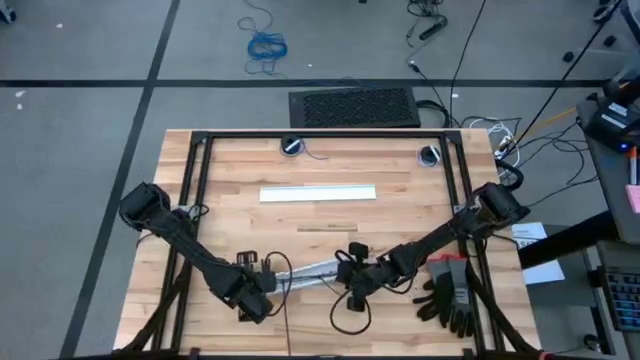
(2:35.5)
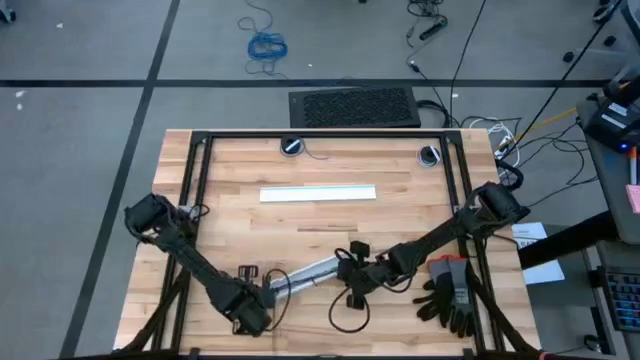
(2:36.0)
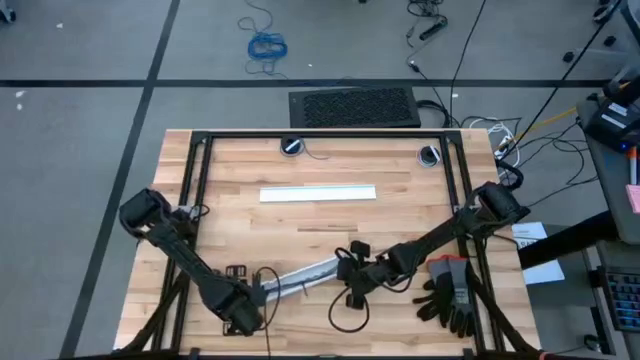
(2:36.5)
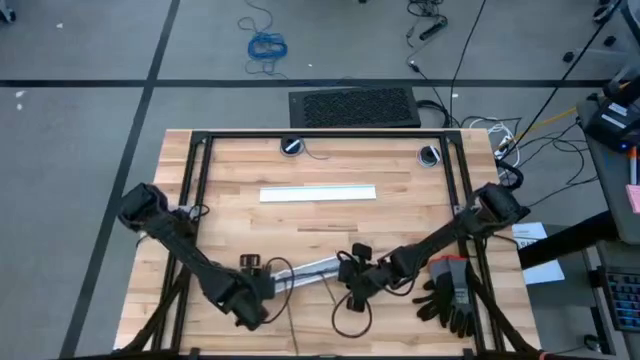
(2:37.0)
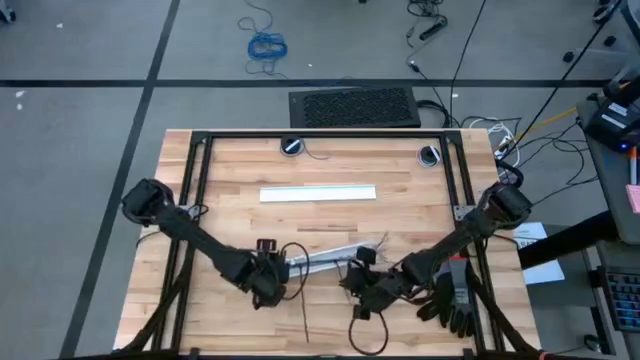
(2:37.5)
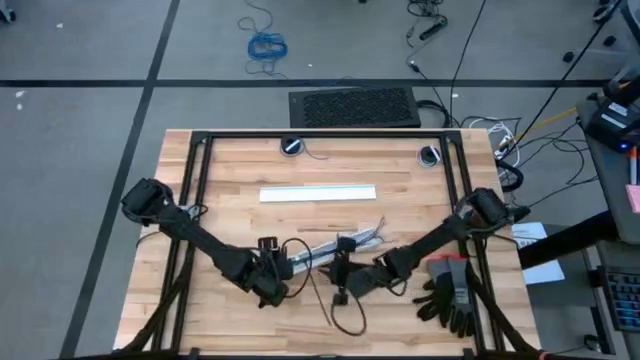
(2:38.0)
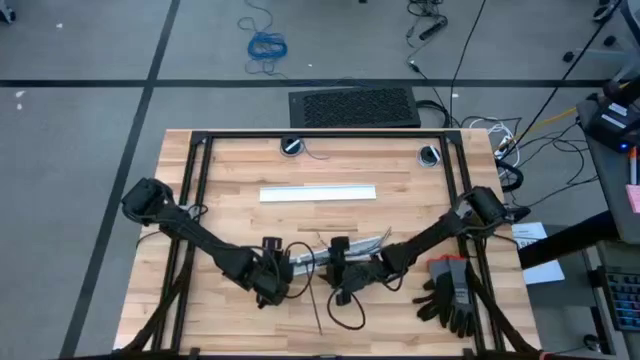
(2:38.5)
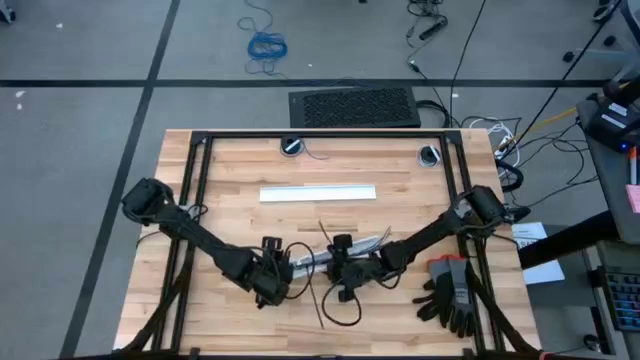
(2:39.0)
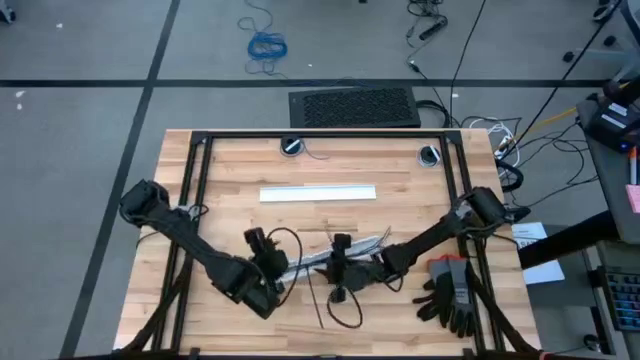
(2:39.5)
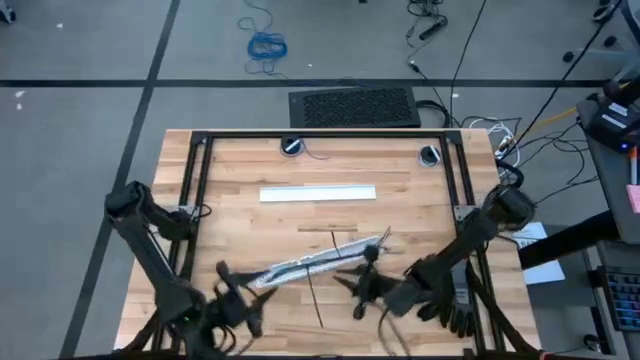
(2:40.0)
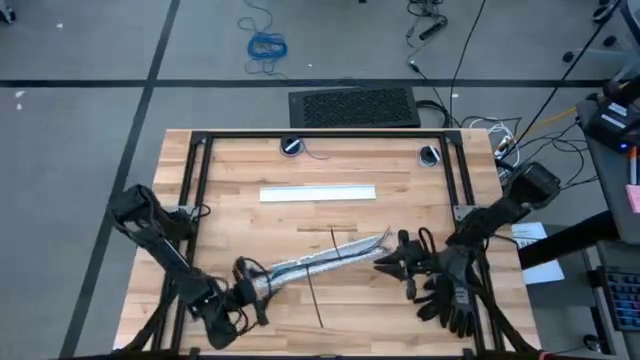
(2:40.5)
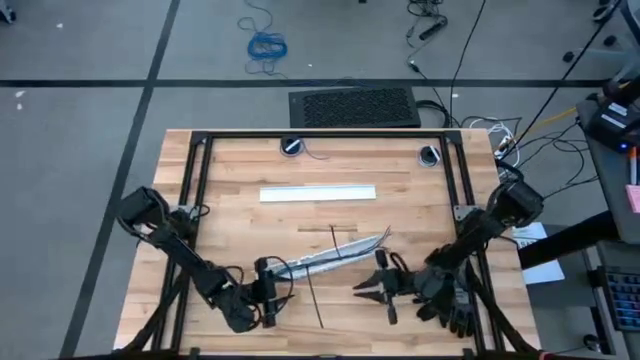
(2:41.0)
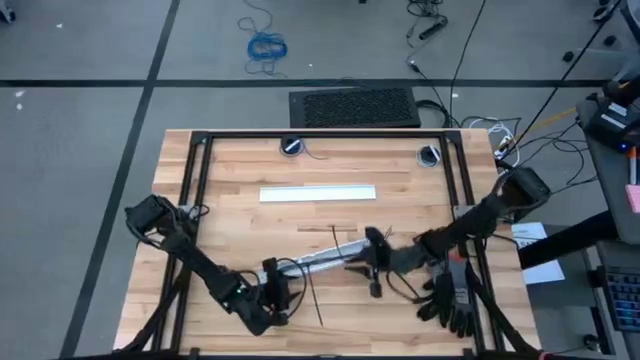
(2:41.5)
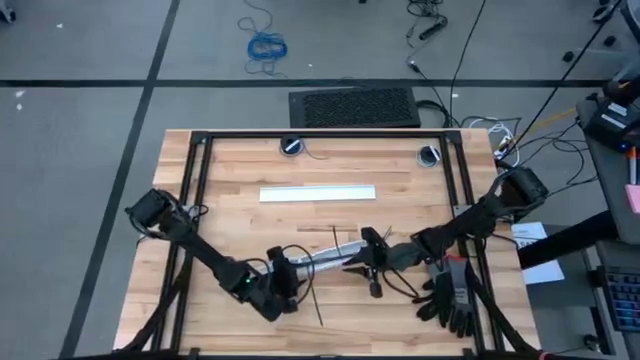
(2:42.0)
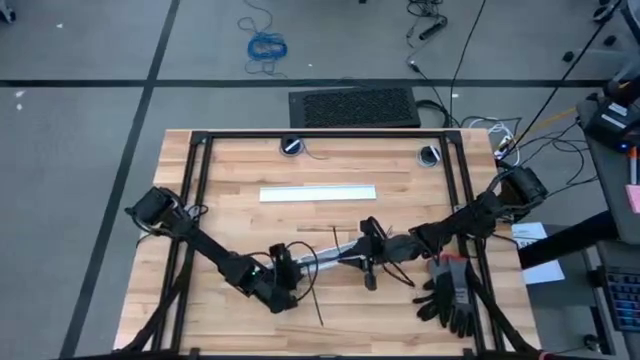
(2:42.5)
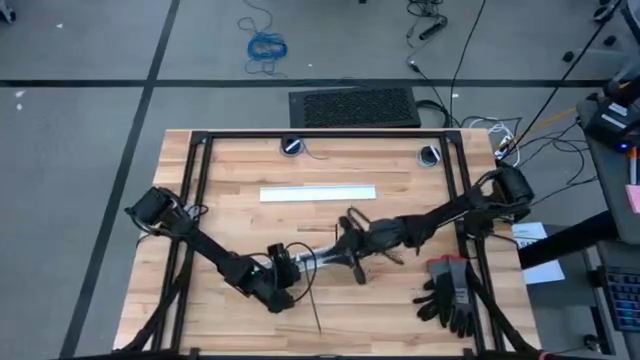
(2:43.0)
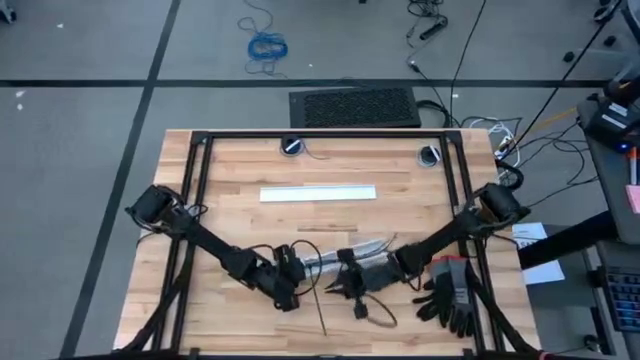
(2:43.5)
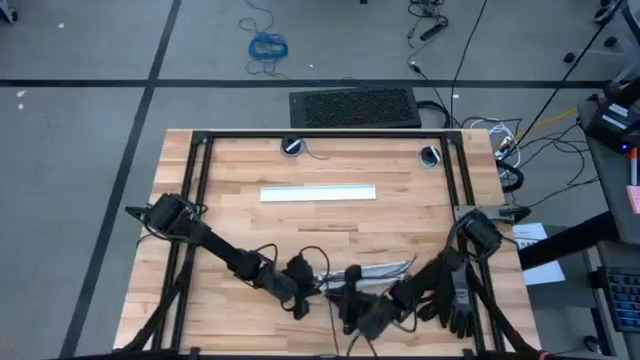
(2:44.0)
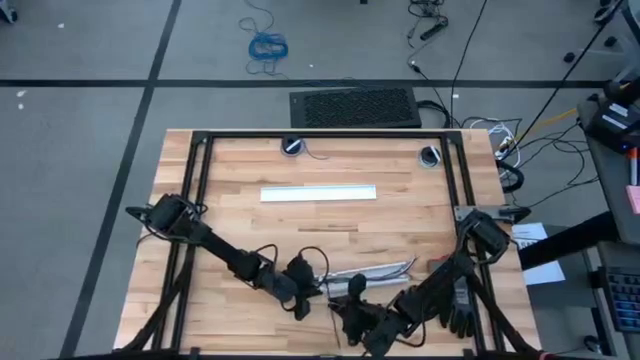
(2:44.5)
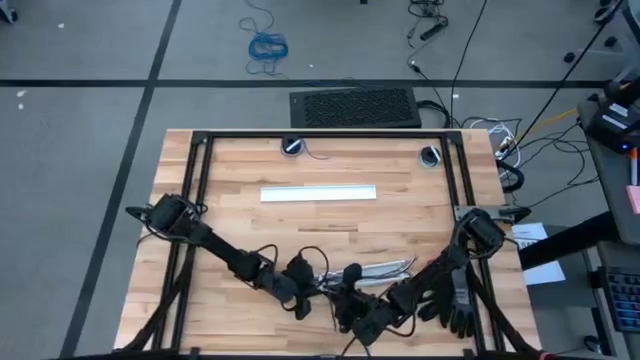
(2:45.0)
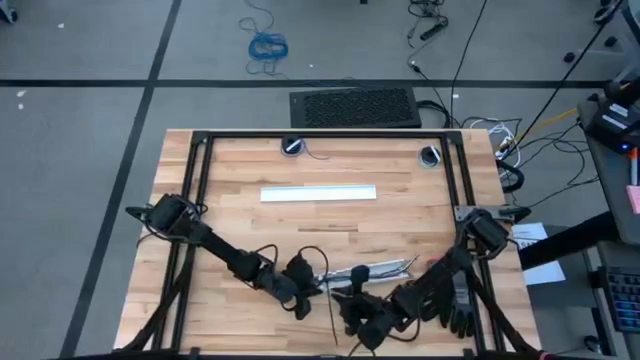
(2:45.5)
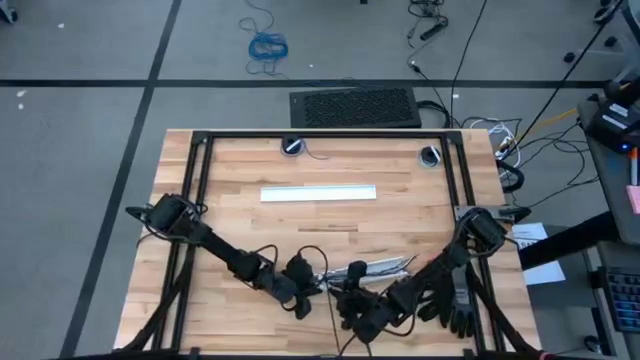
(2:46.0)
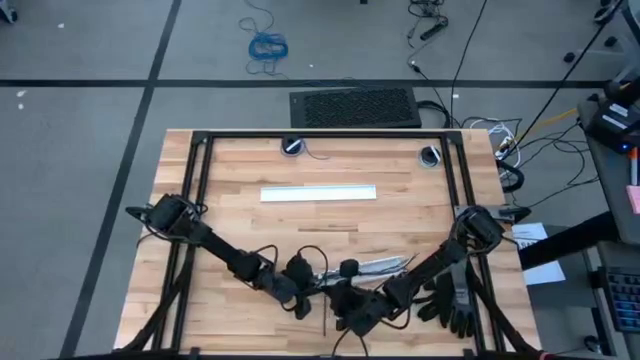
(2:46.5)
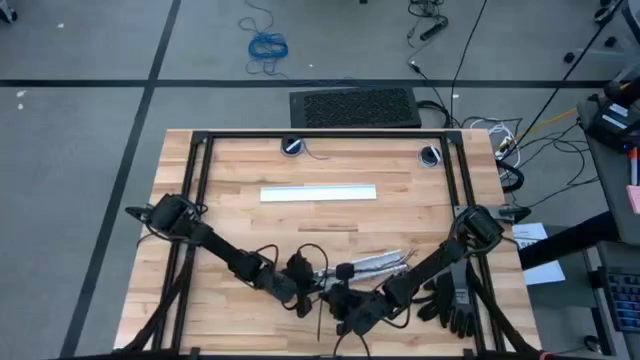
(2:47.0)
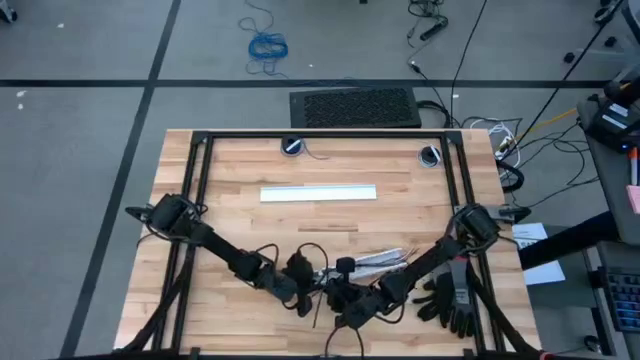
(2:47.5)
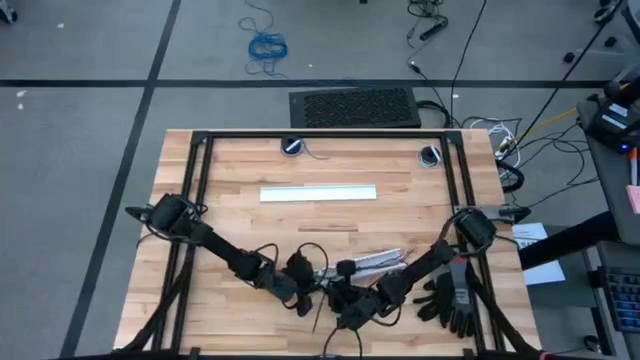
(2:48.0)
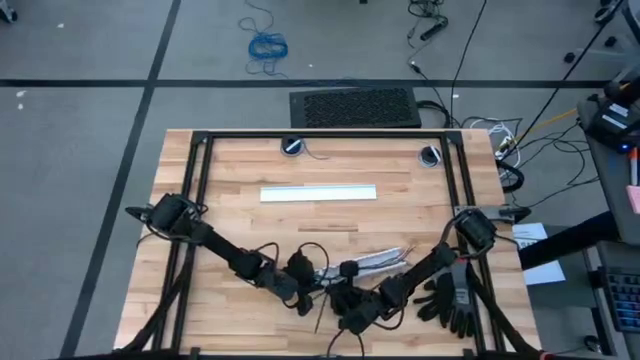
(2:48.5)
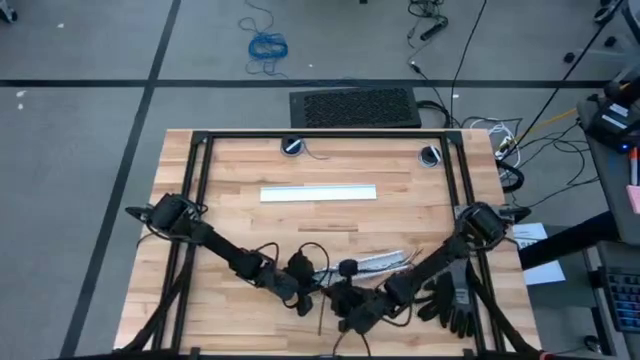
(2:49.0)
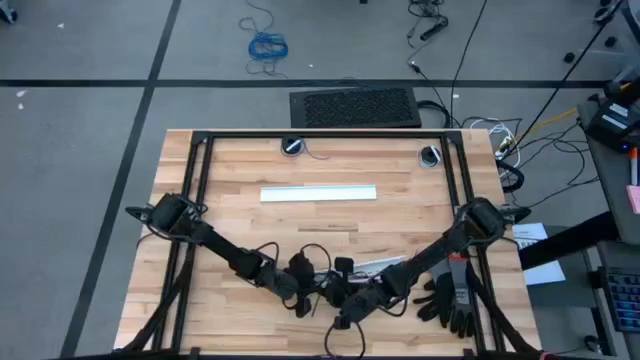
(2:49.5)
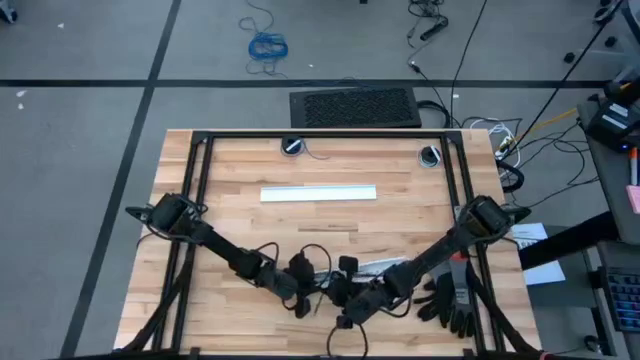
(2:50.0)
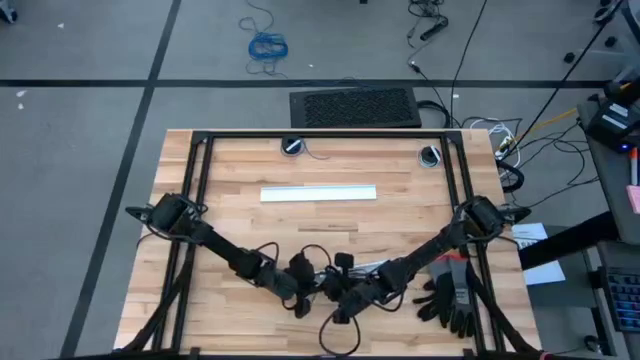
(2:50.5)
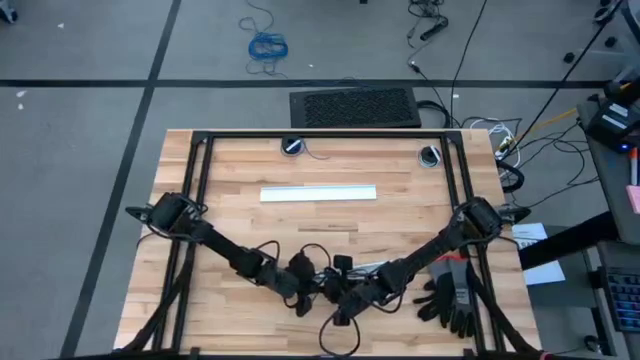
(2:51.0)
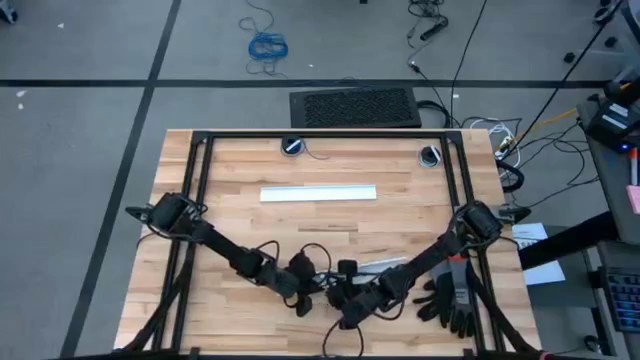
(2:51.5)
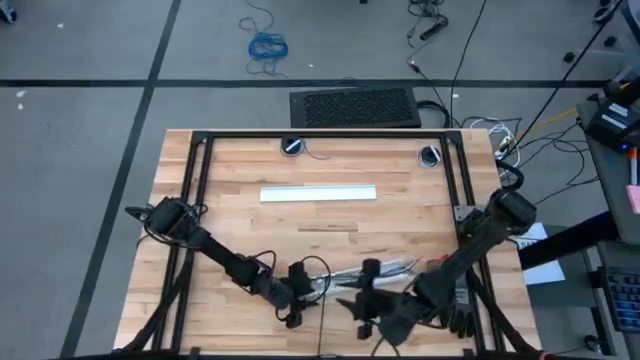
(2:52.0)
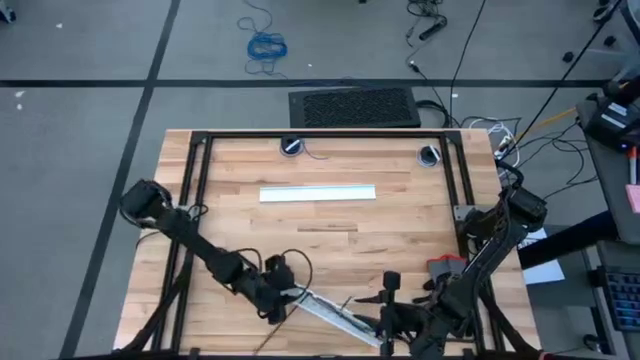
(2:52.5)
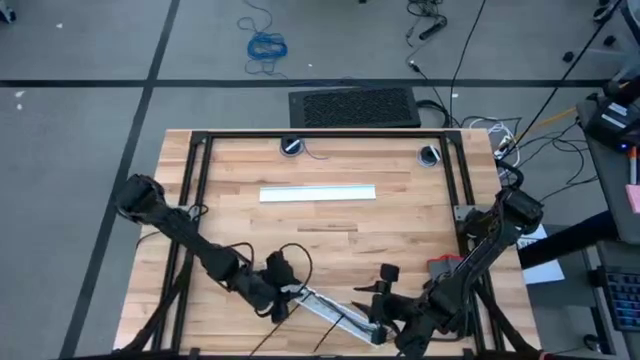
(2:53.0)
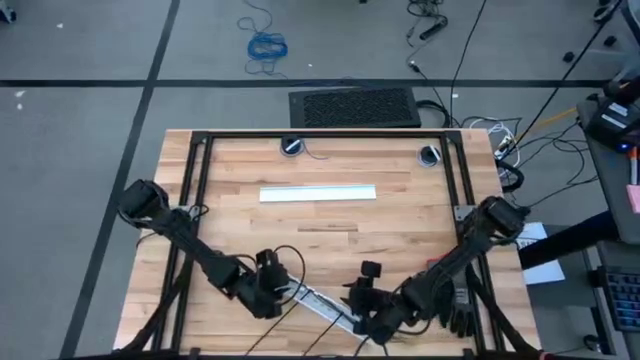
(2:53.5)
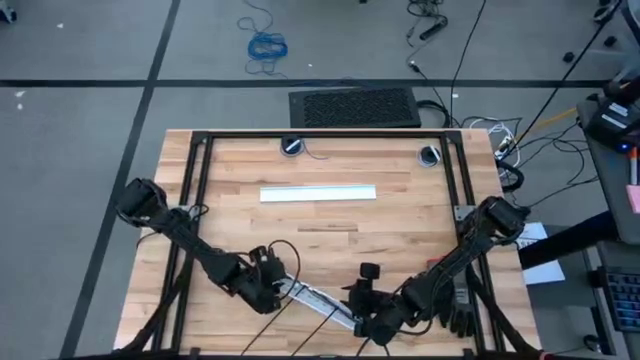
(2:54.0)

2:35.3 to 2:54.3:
Task: Ziptie cables
Put the ziptied cables into the cable duct

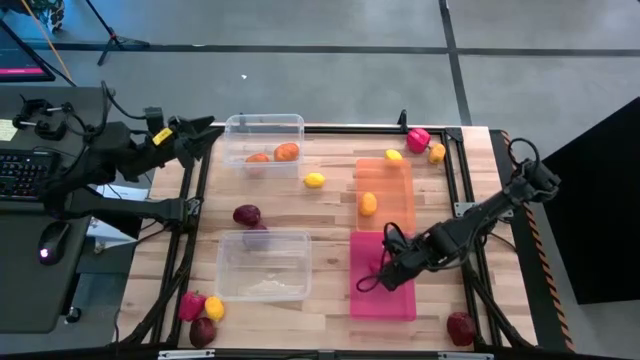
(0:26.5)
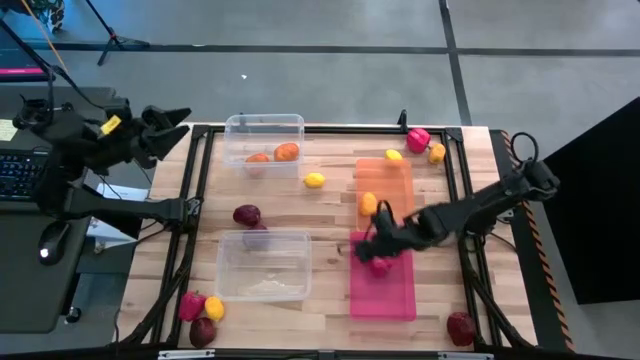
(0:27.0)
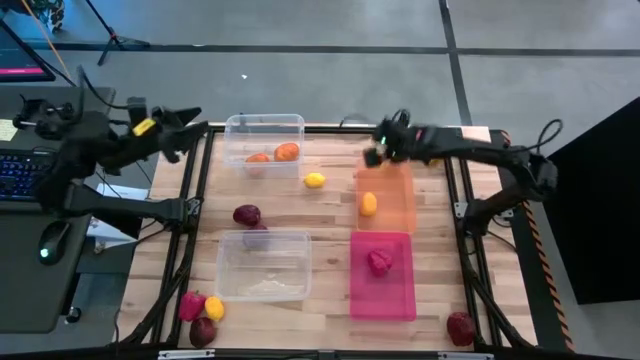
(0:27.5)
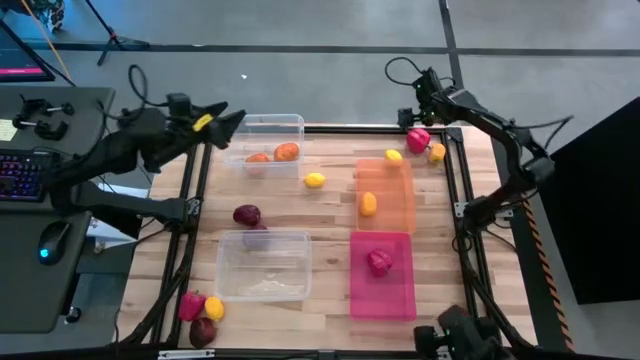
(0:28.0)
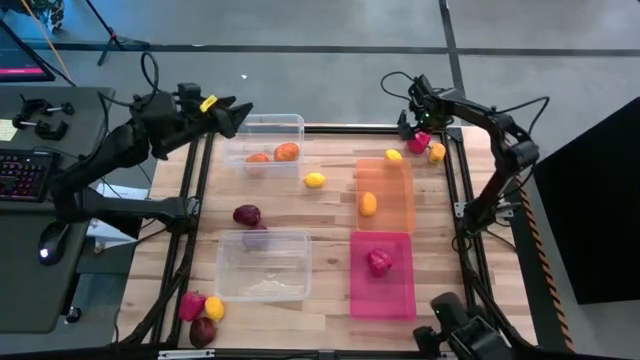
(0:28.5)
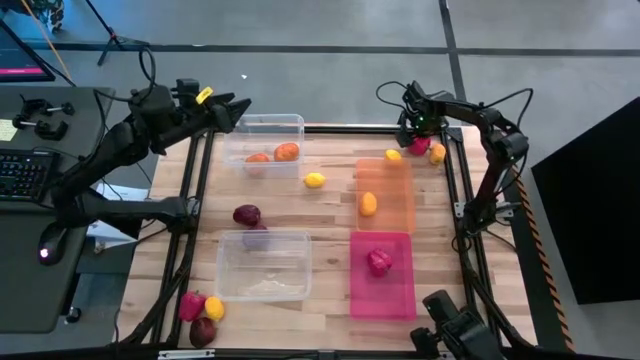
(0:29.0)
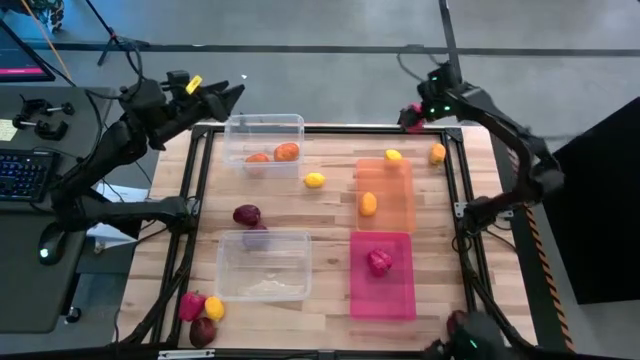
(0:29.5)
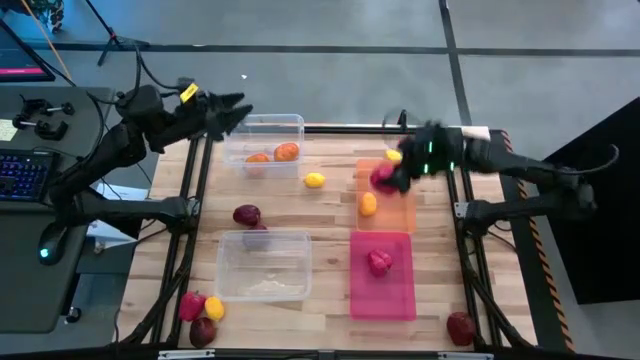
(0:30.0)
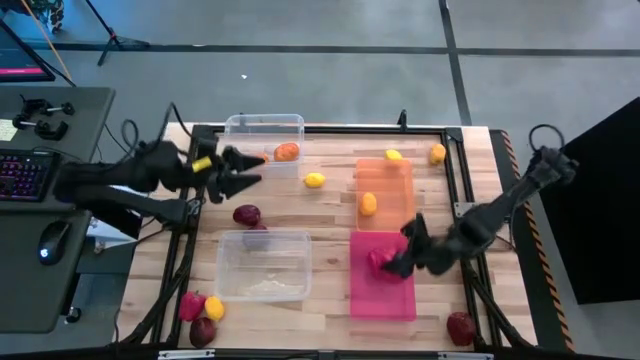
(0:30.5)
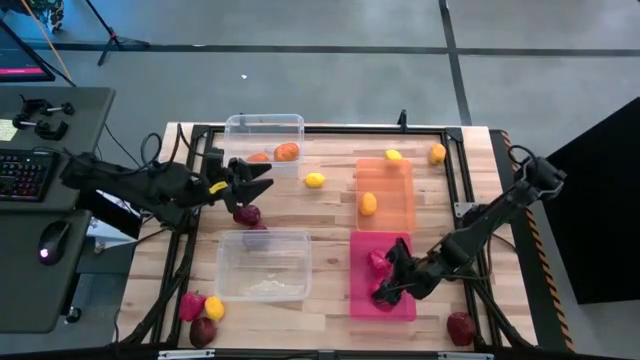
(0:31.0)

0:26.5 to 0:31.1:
Task: Sort produce into baskets
Put the red bell pepper into the pink bin
